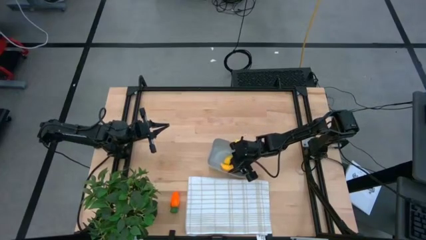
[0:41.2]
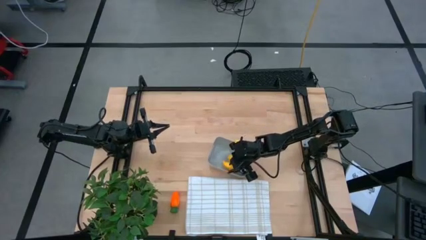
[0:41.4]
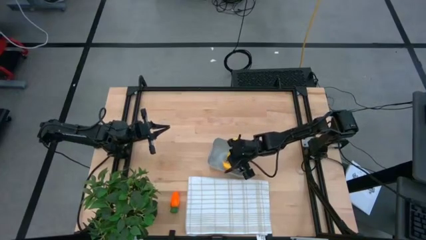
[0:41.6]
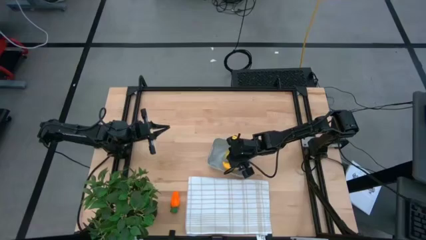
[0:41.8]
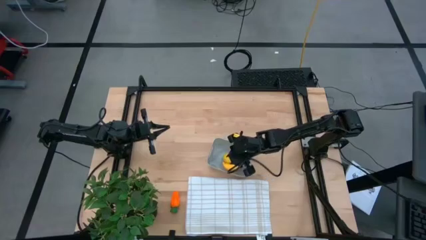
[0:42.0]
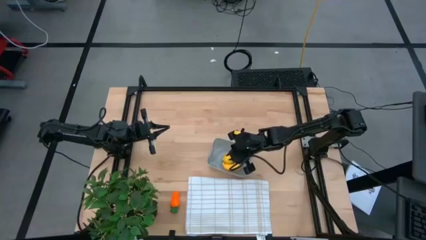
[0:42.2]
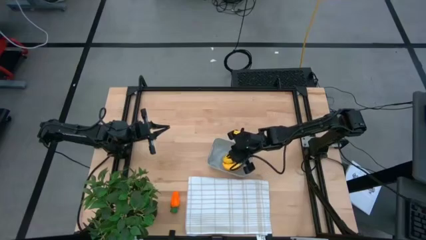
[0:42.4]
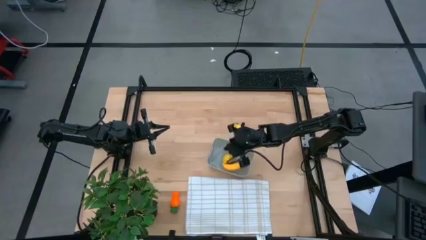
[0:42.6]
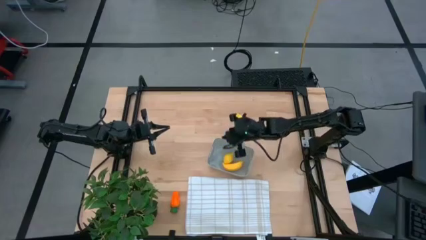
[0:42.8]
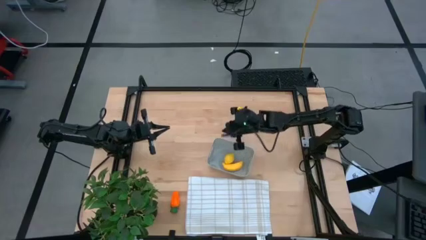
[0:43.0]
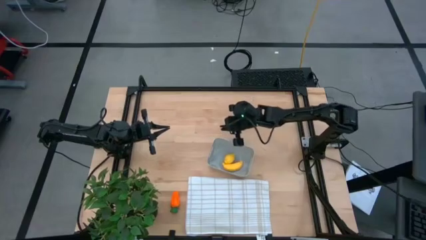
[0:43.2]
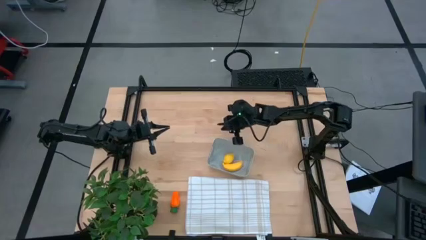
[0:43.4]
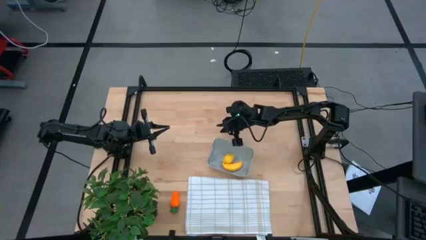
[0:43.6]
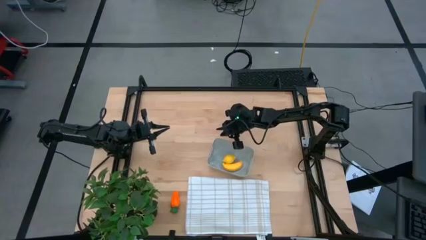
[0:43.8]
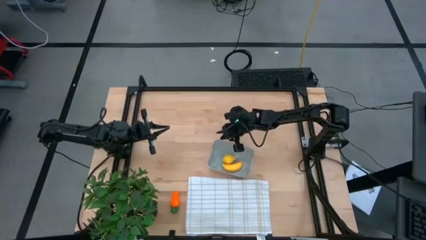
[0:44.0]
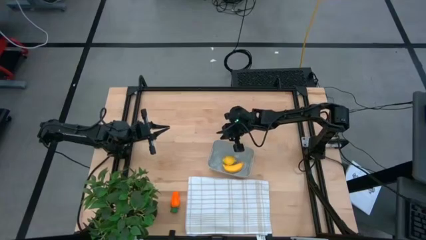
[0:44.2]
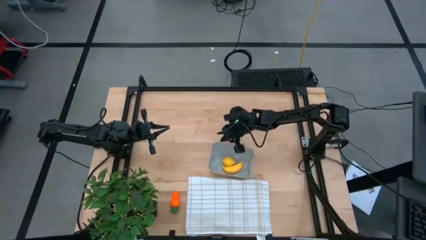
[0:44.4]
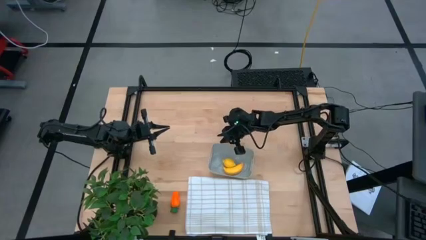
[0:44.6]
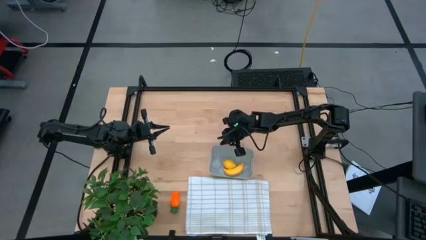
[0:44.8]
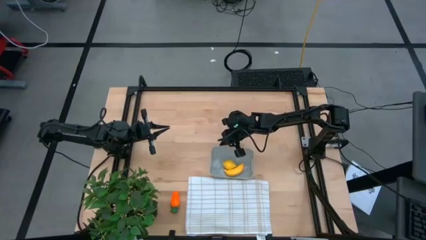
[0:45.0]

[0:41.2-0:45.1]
Task: Pick and placing Produce into tupperware
Adjust the bin

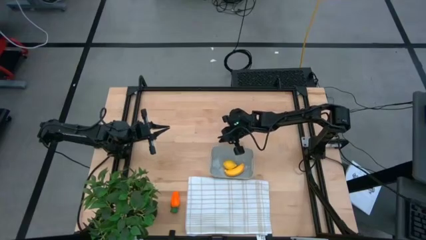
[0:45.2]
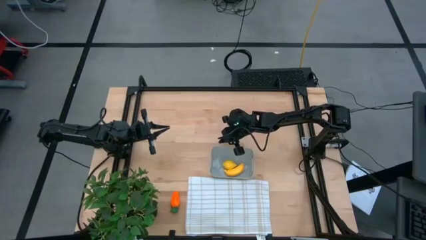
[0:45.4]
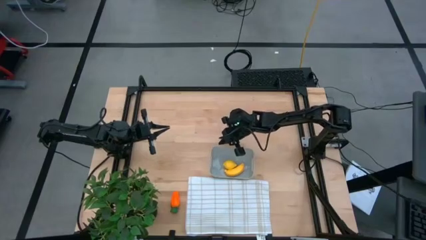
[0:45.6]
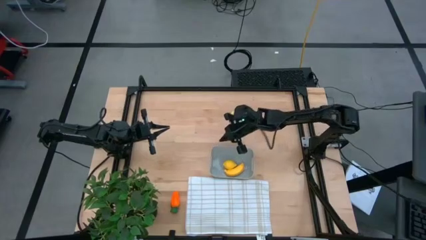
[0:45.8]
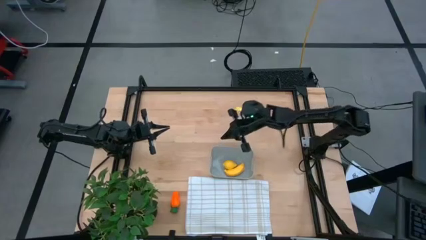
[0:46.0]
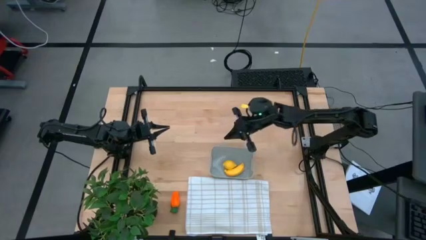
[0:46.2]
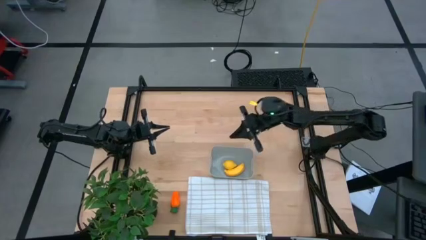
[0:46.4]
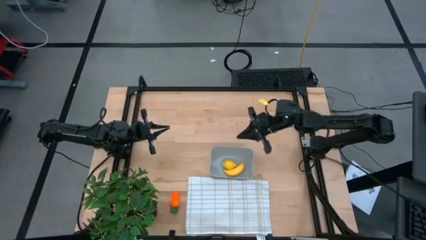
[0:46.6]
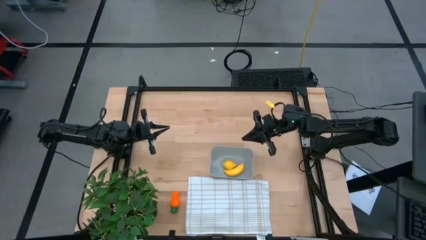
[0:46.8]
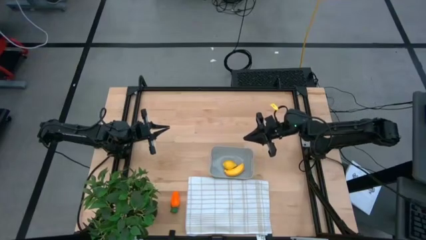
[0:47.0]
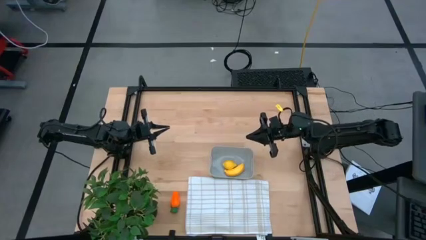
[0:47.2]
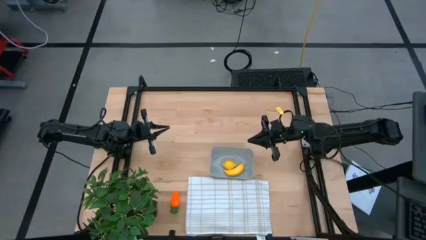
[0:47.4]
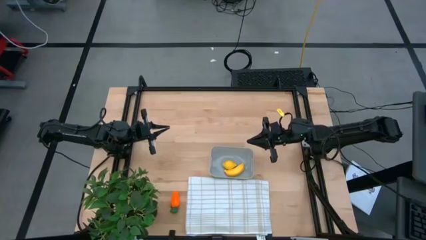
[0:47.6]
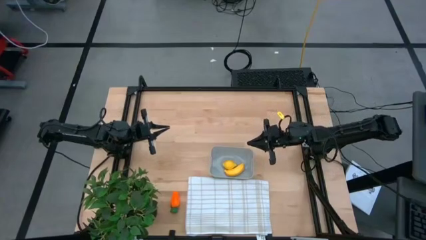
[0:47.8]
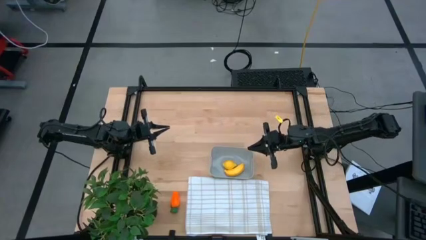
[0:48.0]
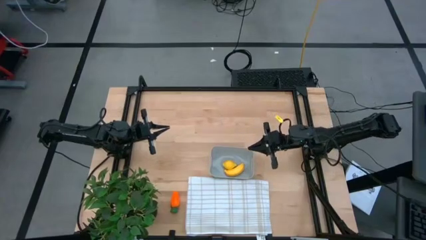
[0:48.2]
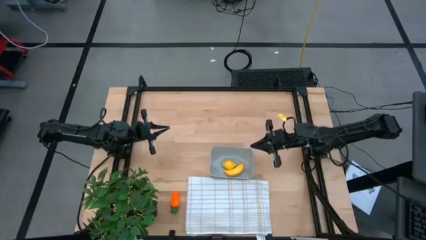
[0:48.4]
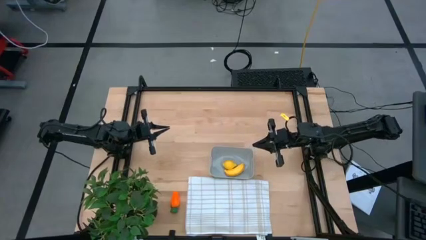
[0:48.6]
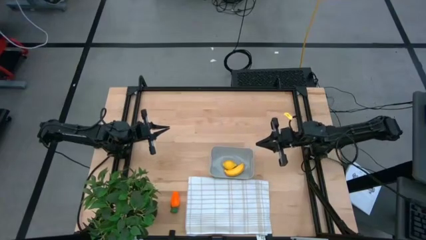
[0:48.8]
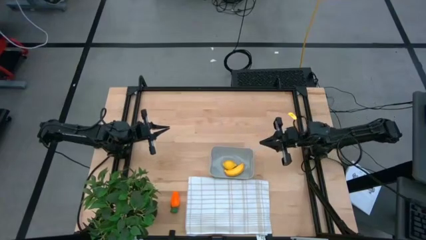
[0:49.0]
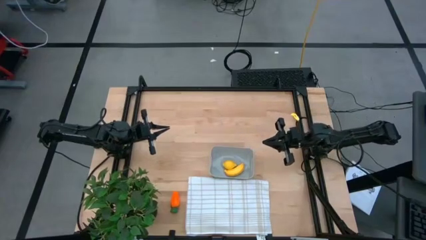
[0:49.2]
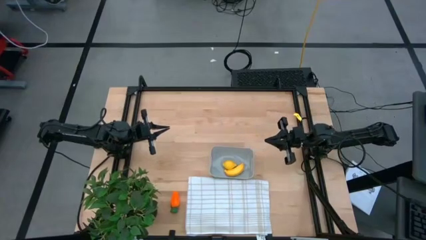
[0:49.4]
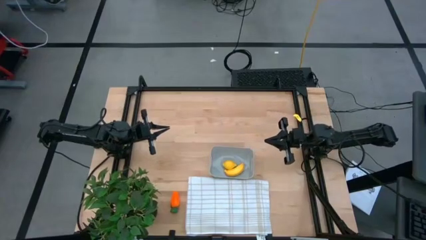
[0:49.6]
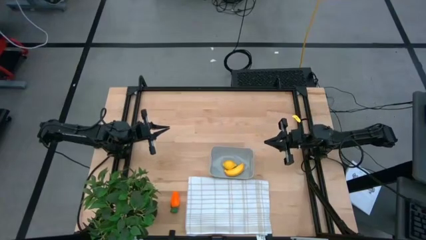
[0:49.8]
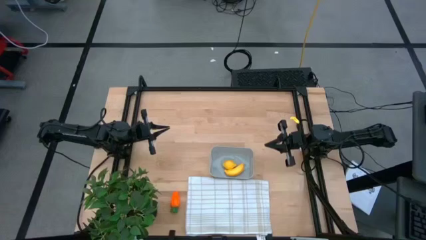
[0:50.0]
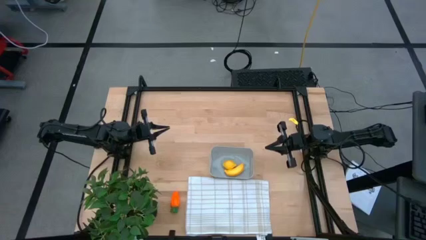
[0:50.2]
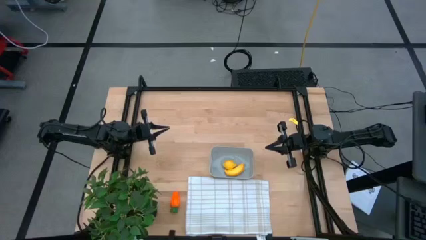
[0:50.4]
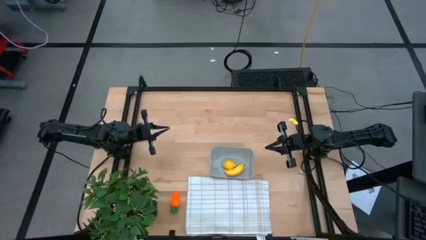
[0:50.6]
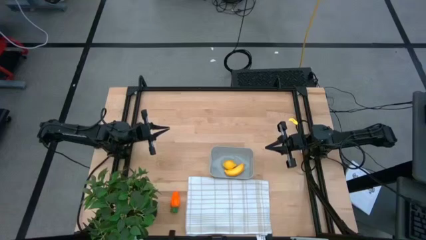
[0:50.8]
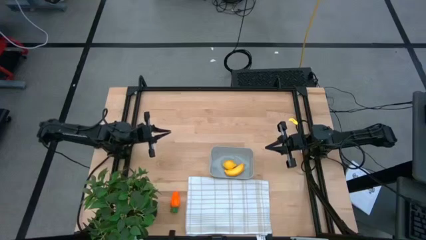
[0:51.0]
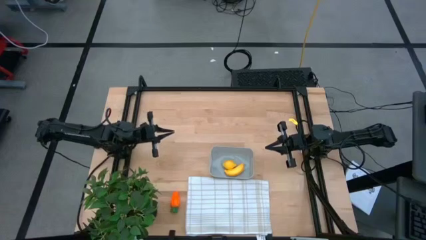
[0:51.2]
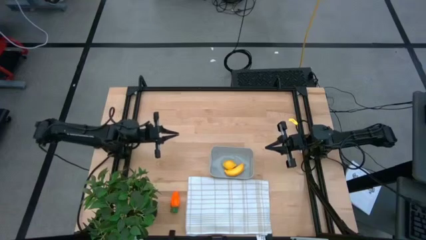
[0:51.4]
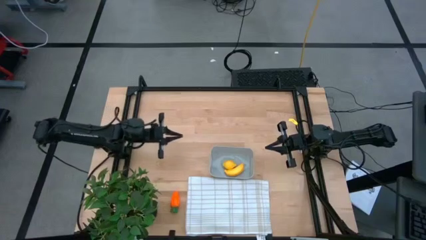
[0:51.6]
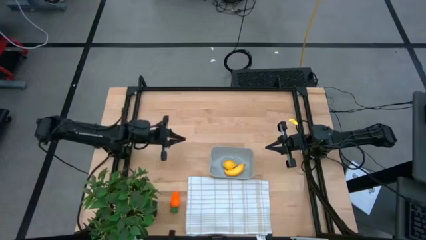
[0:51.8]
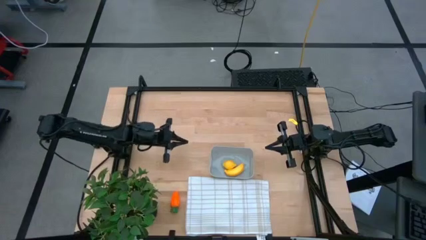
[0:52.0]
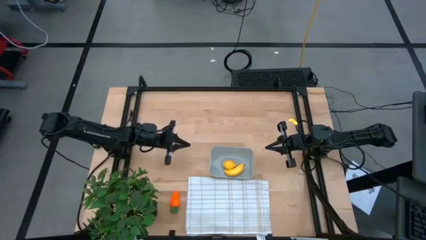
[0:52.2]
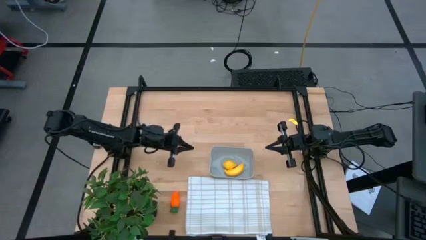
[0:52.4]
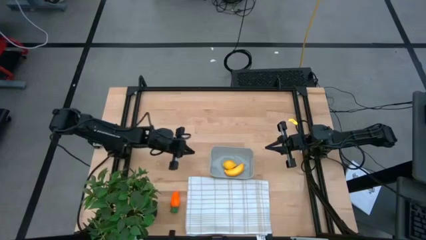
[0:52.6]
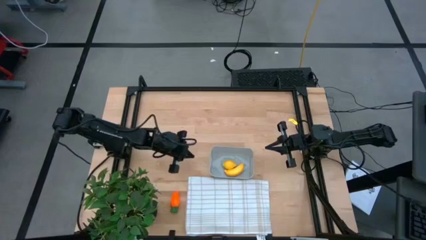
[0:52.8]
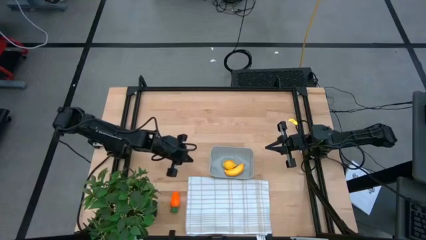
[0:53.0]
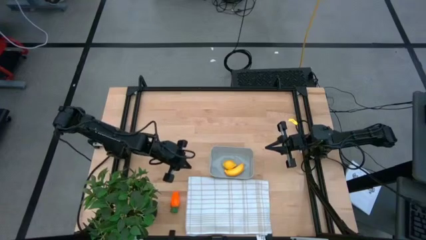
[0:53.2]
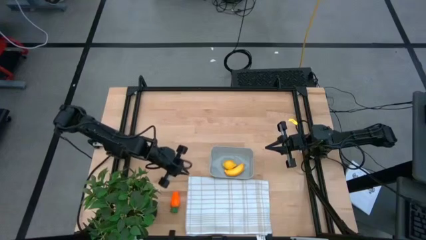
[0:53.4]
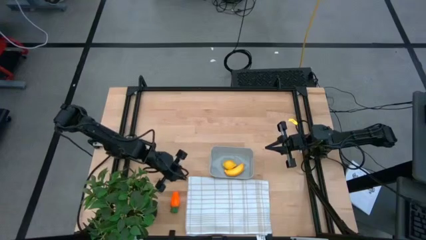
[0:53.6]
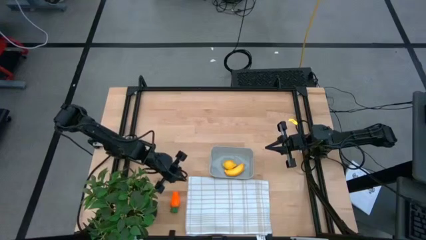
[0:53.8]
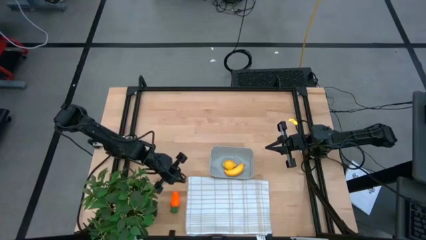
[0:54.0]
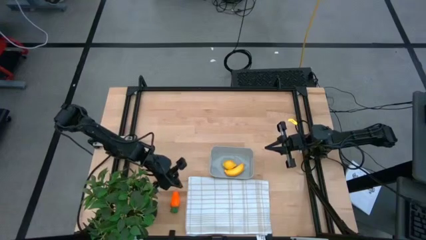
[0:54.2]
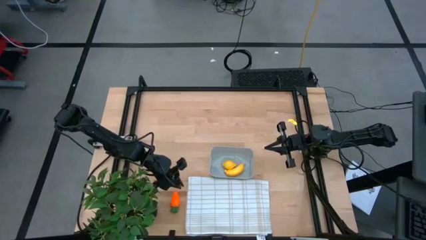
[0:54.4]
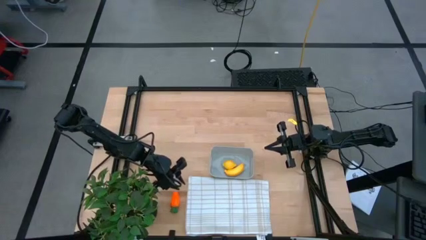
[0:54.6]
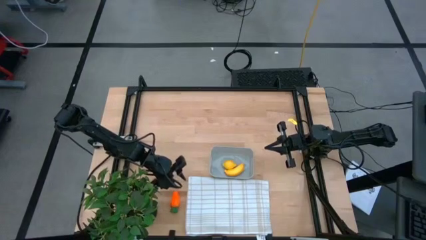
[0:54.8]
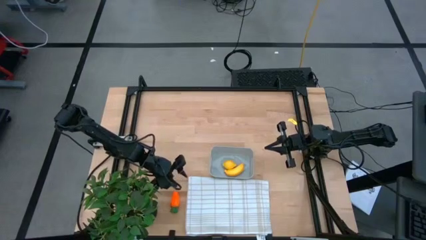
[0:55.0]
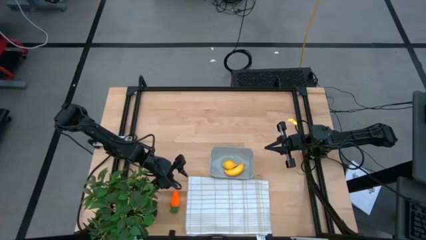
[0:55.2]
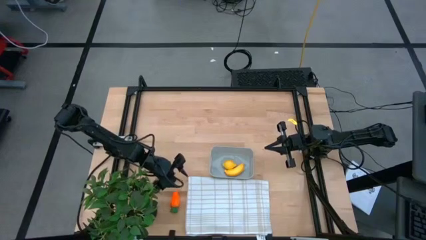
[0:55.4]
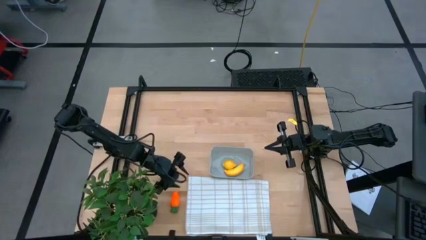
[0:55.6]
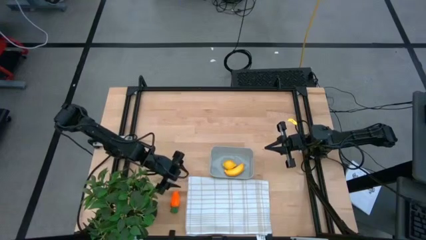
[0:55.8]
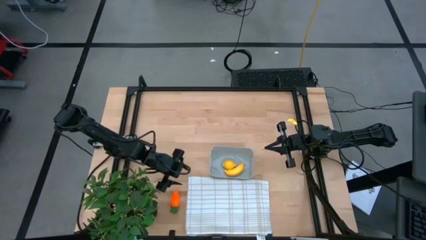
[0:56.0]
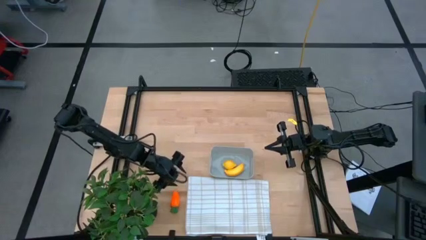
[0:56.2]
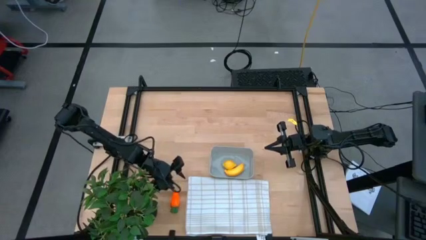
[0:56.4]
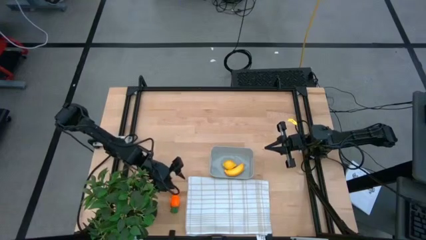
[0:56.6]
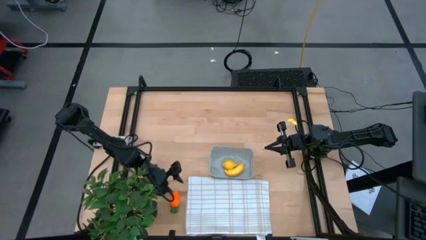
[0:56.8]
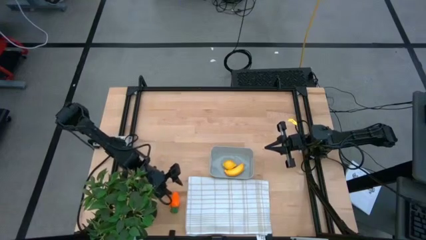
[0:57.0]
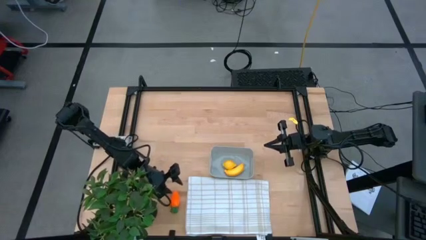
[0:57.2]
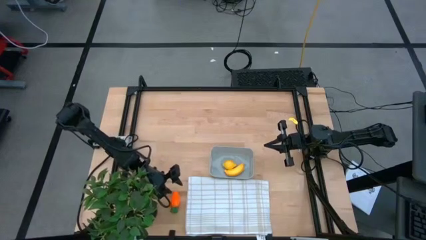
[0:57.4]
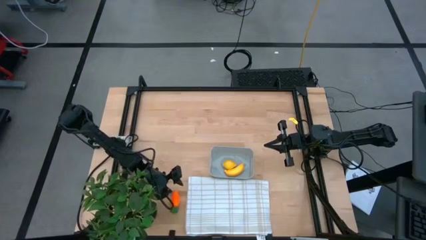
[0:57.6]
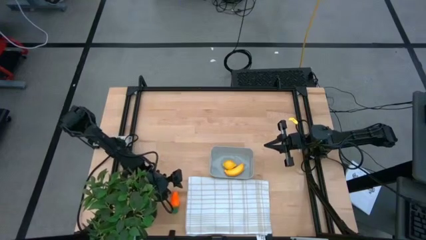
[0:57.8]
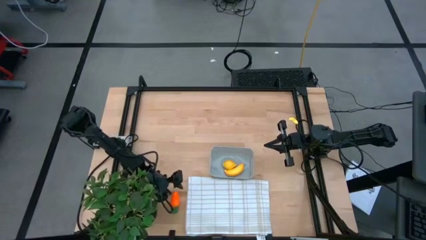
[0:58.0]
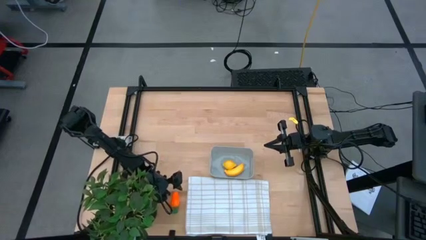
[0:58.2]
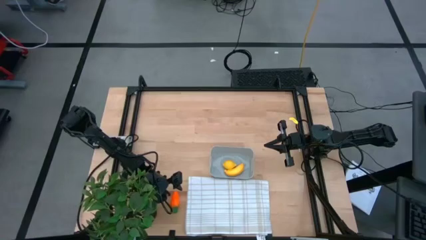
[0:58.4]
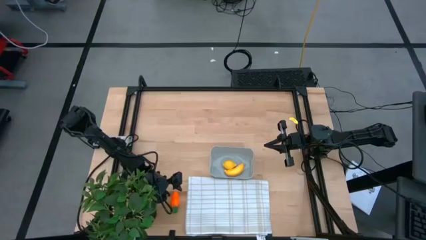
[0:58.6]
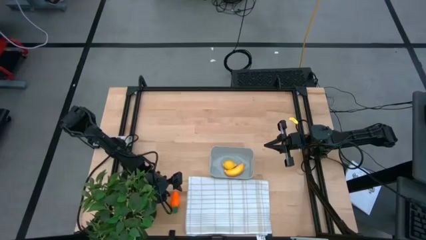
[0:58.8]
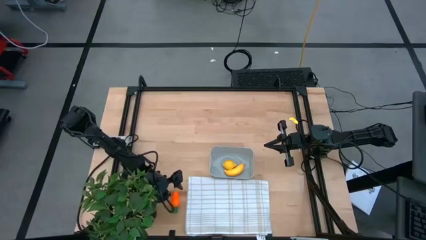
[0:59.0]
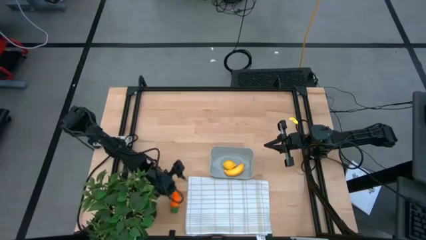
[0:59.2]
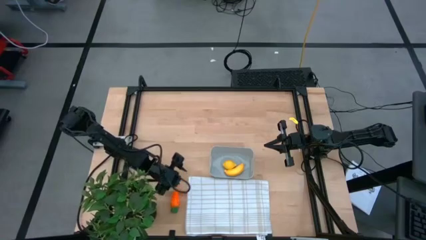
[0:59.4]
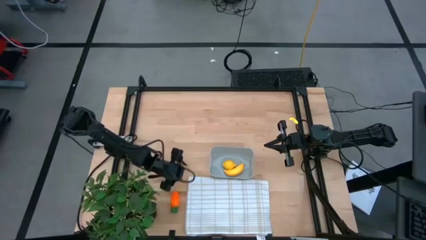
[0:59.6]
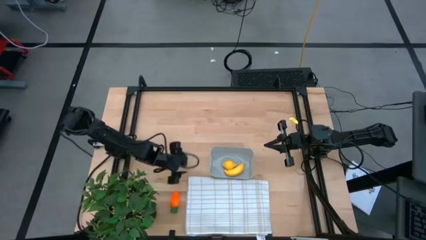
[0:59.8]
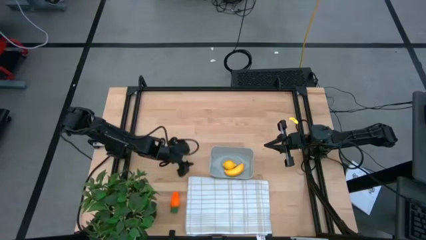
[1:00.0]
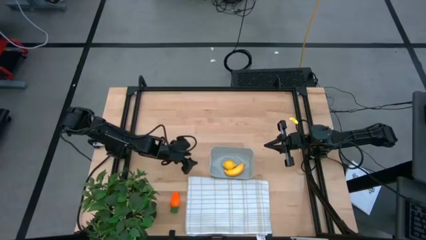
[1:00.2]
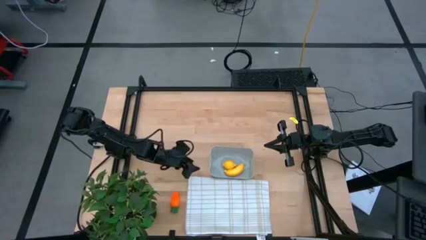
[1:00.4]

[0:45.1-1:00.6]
Put the orange carrot into the bin
